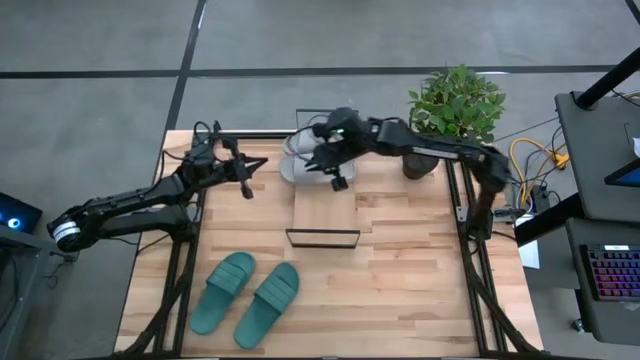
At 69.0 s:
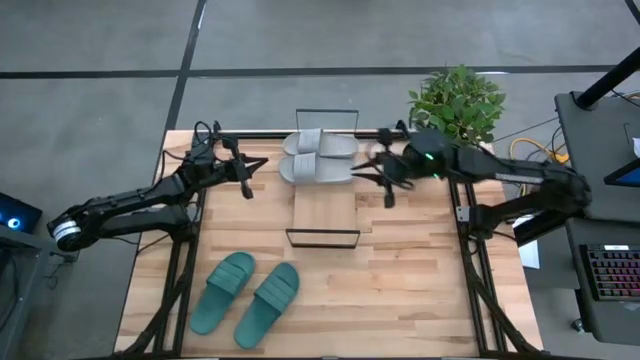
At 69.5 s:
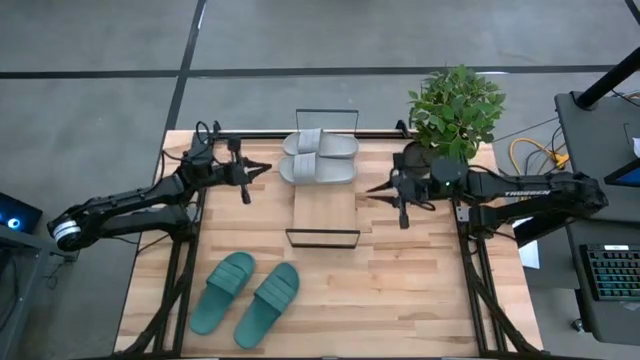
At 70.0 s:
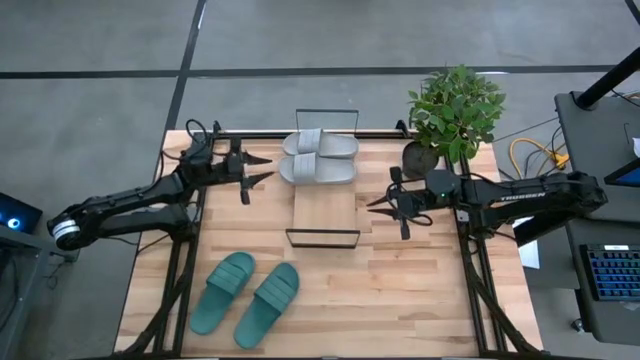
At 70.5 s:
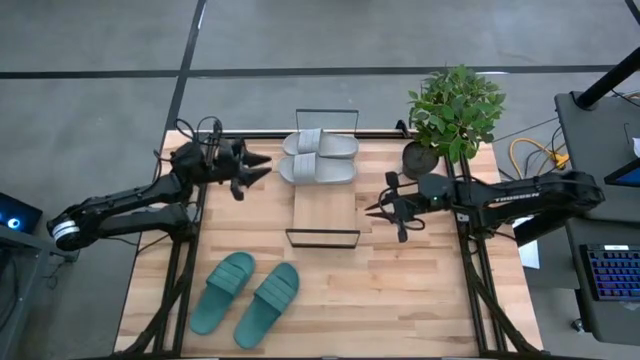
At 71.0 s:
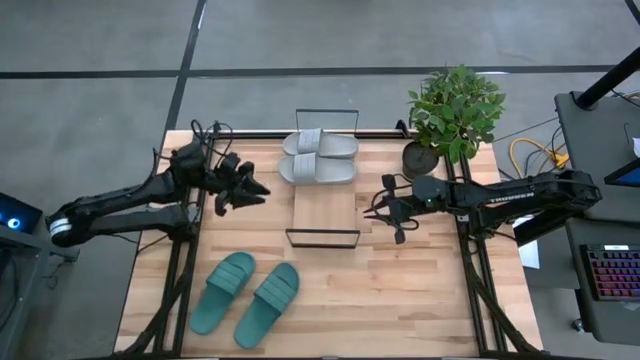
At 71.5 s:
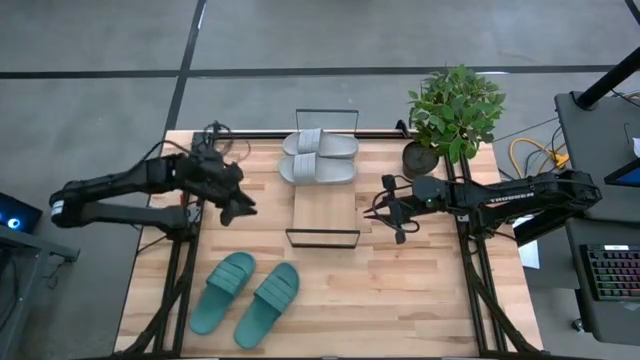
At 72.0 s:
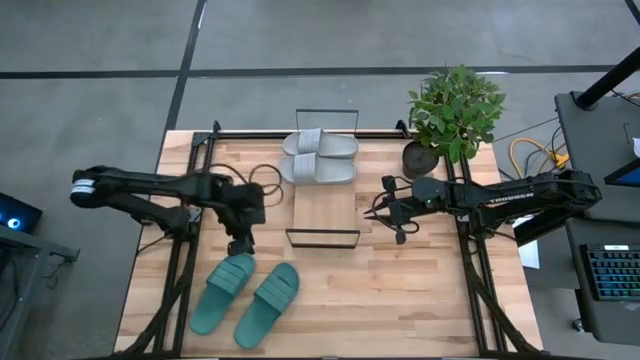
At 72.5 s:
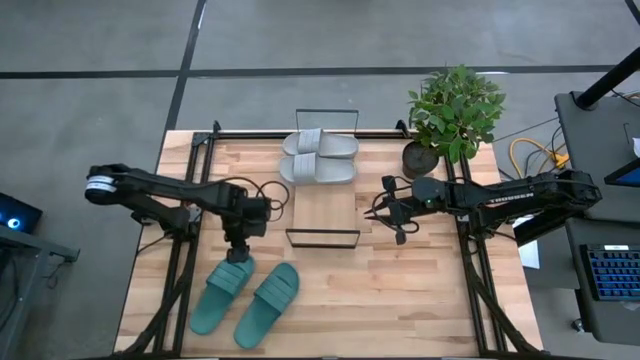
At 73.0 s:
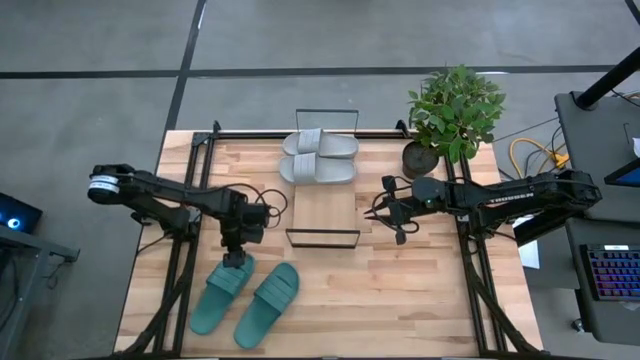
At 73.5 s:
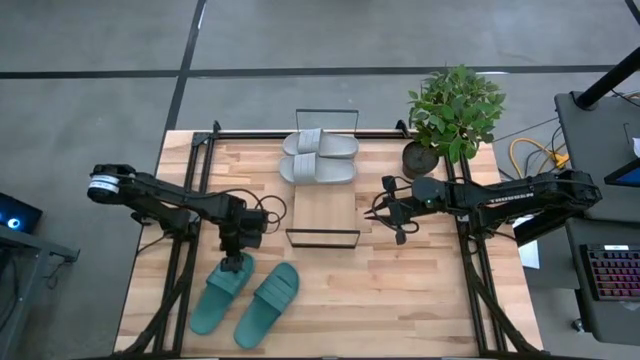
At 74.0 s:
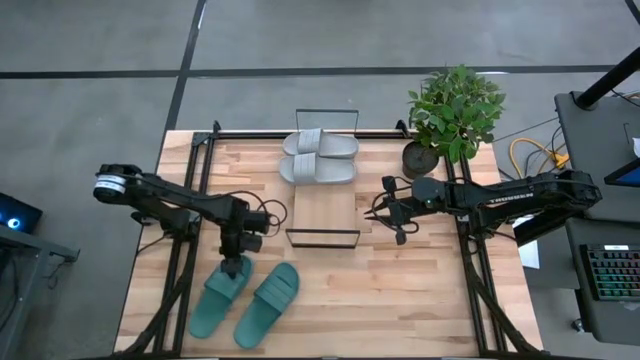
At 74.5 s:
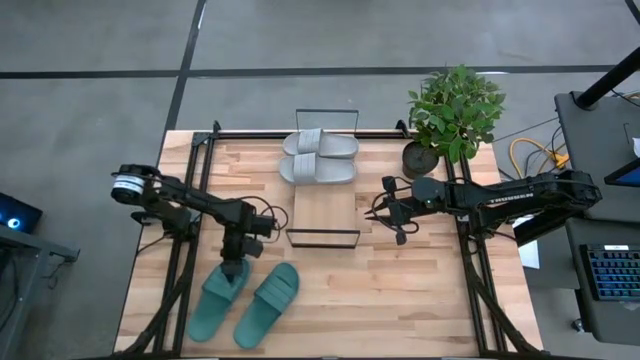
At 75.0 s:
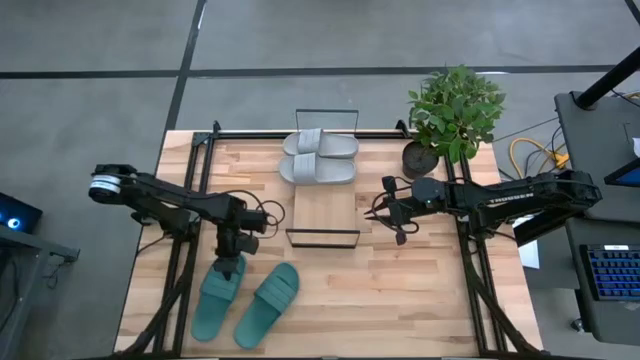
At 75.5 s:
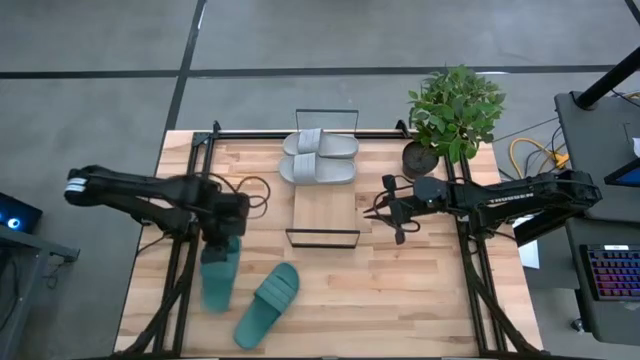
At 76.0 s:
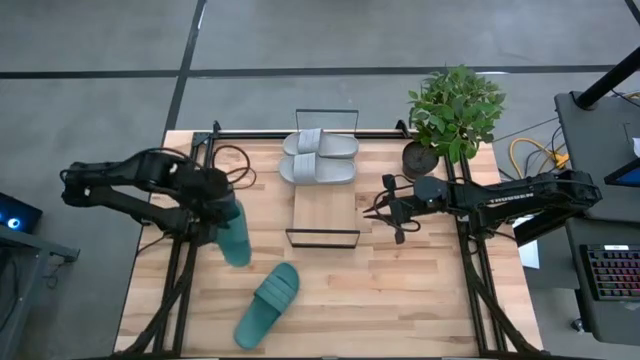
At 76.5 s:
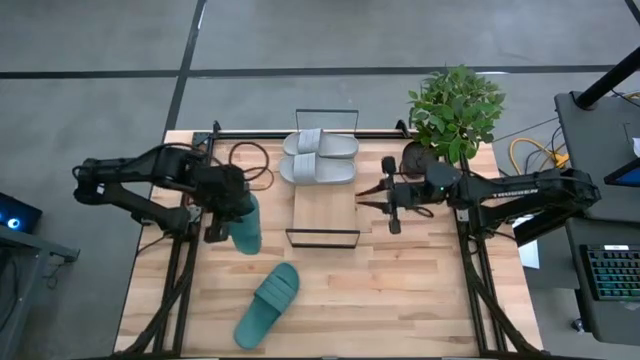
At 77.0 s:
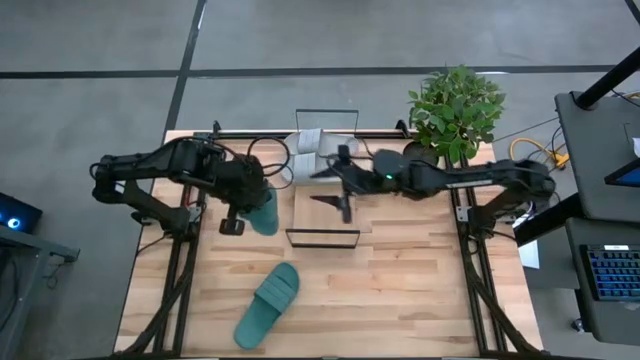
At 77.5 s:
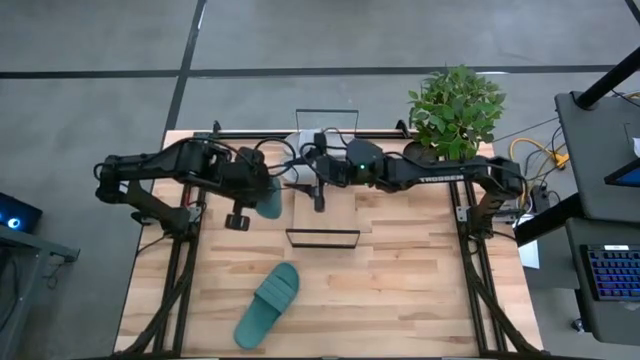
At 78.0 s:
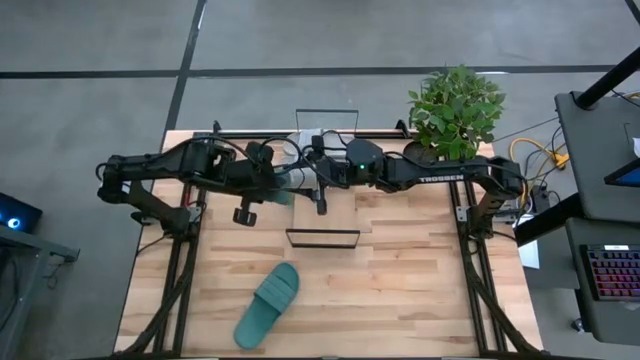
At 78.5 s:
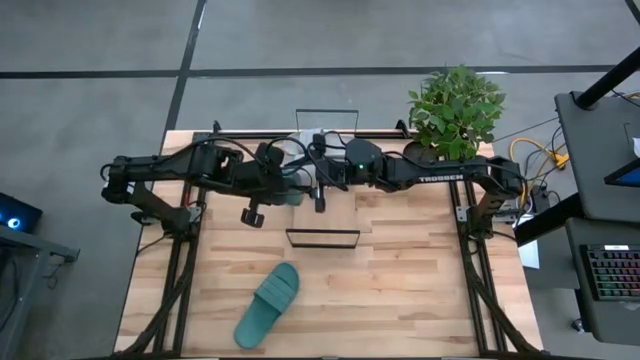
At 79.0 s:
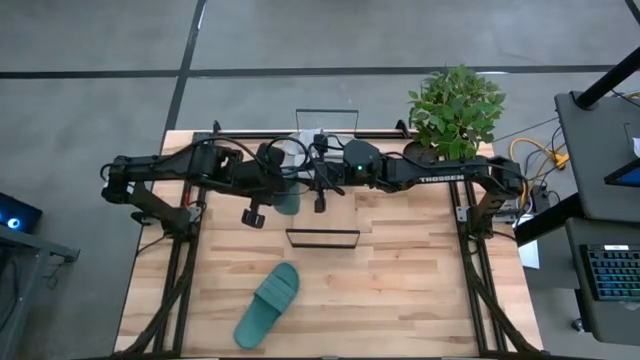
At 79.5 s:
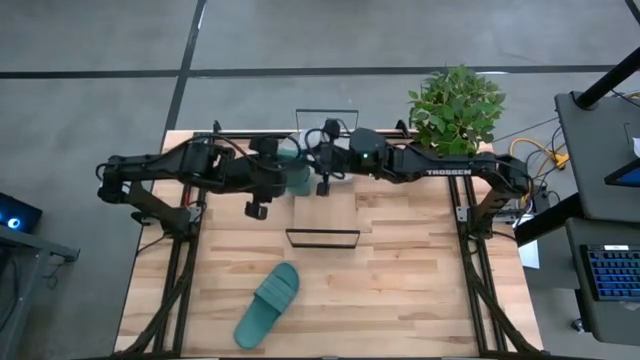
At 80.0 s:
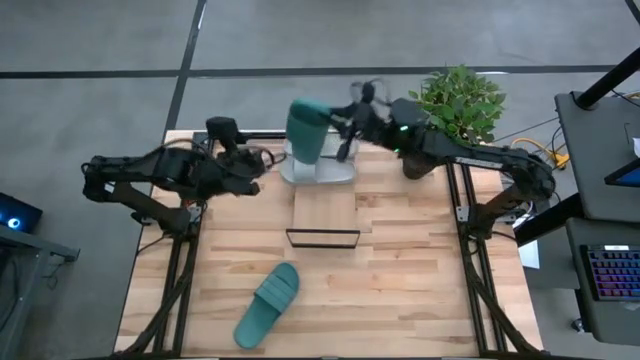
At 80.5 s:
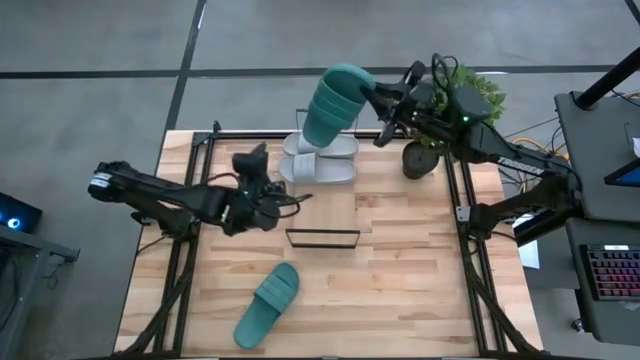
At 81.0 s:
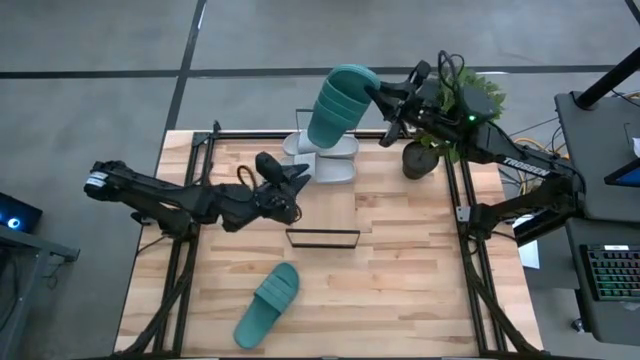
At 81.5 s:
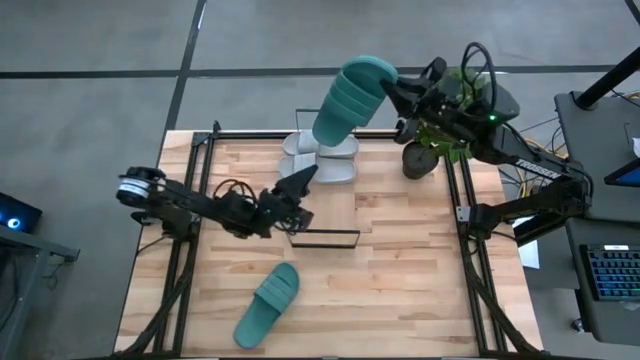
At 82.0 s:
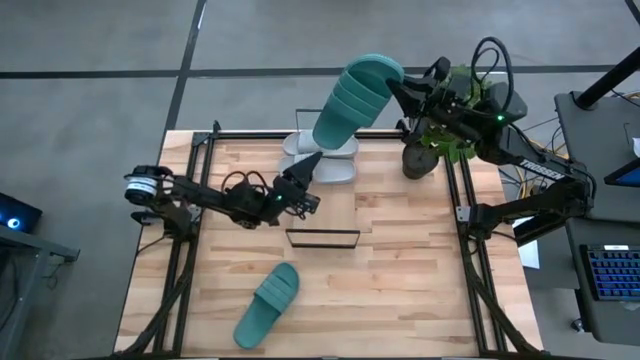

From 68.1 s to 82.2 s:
Task: Pick and place slides into the shelf
Put the left green slipper on the shelf

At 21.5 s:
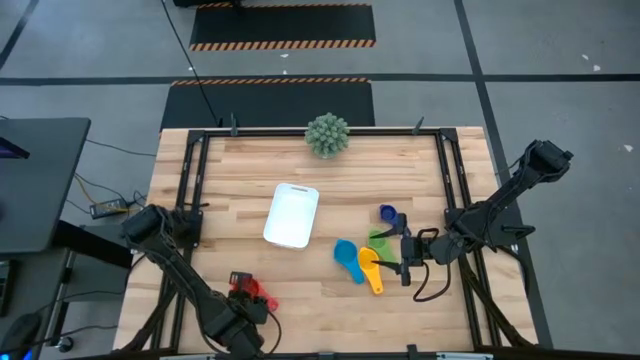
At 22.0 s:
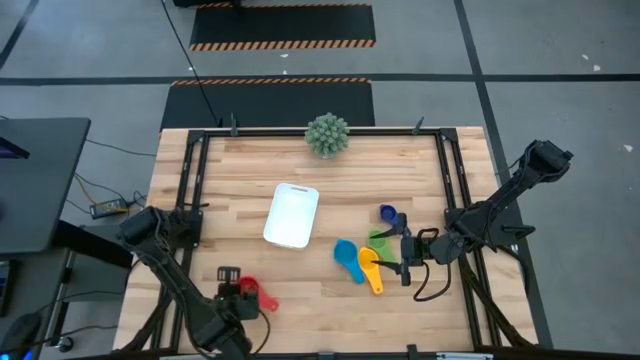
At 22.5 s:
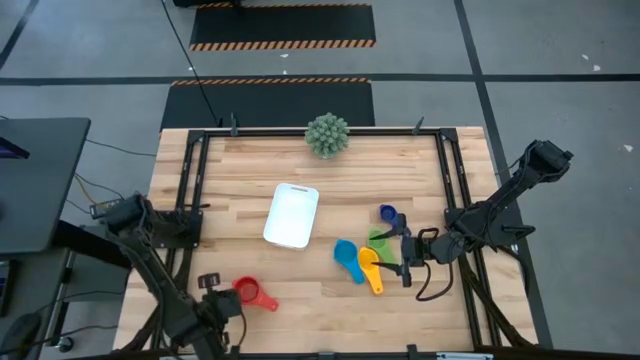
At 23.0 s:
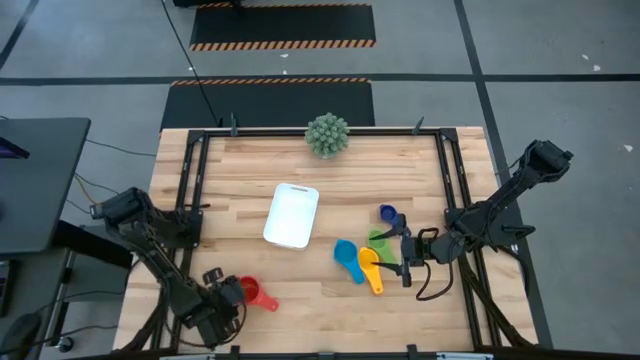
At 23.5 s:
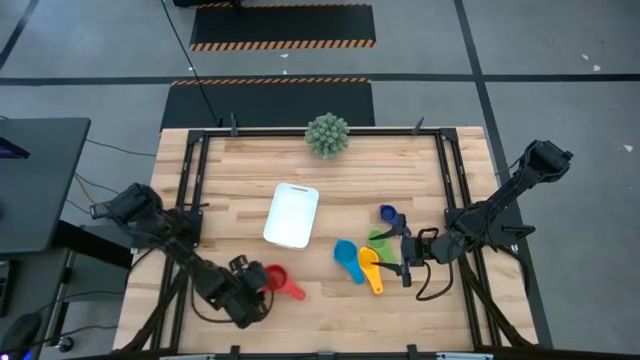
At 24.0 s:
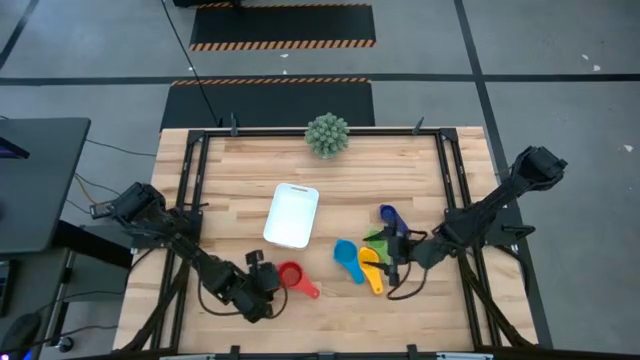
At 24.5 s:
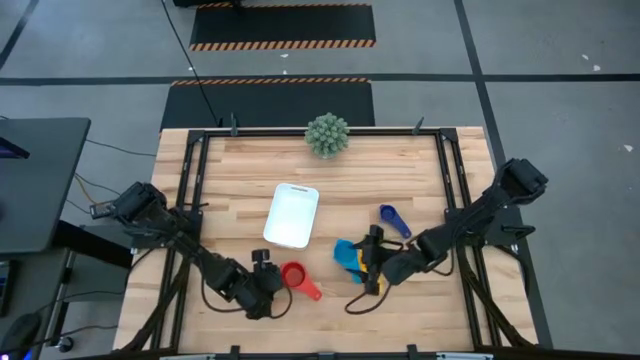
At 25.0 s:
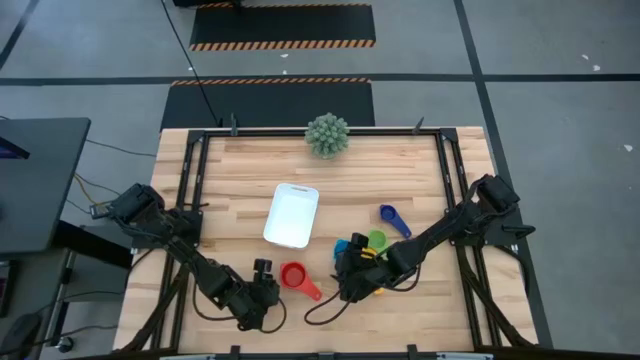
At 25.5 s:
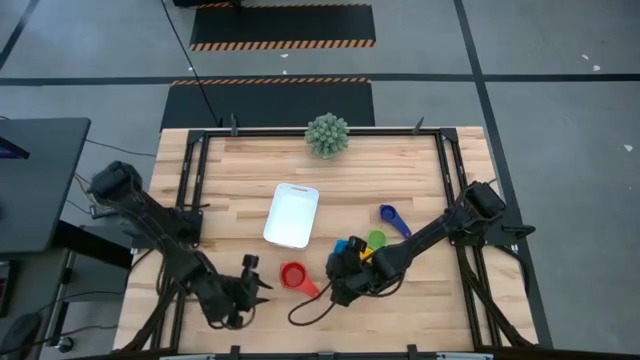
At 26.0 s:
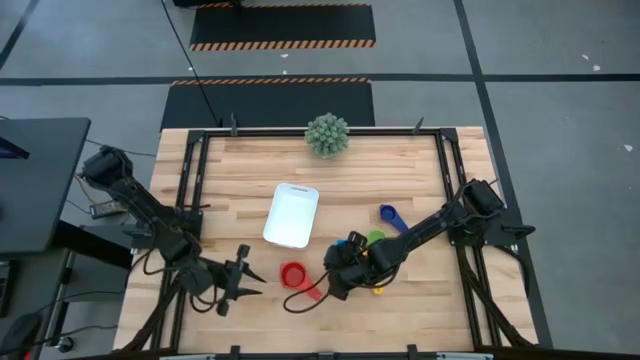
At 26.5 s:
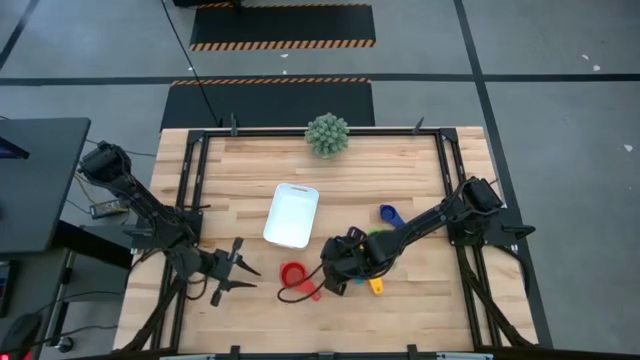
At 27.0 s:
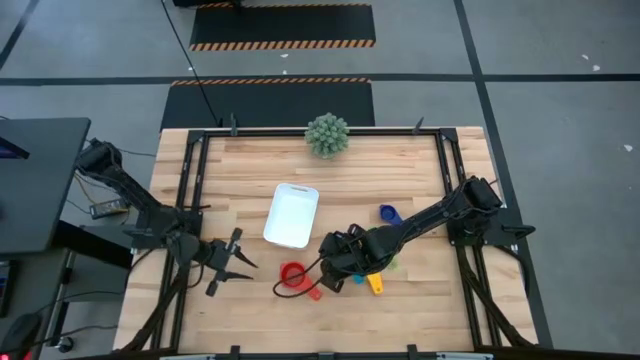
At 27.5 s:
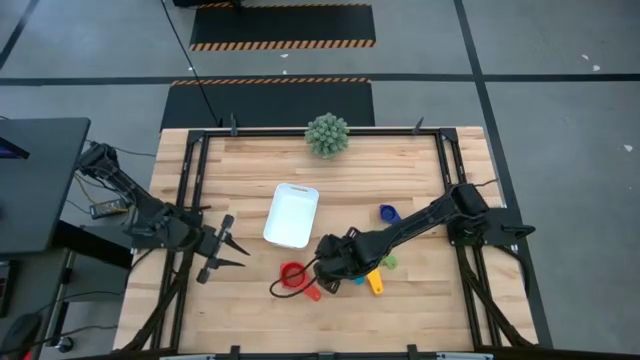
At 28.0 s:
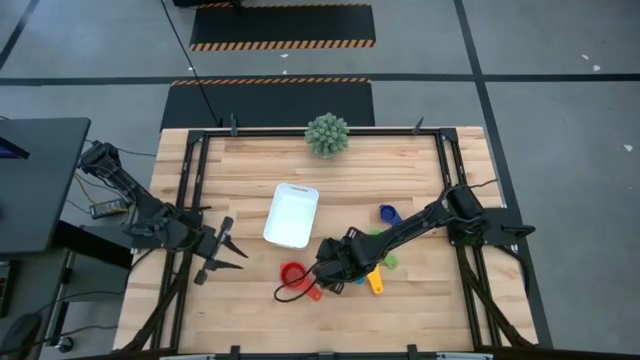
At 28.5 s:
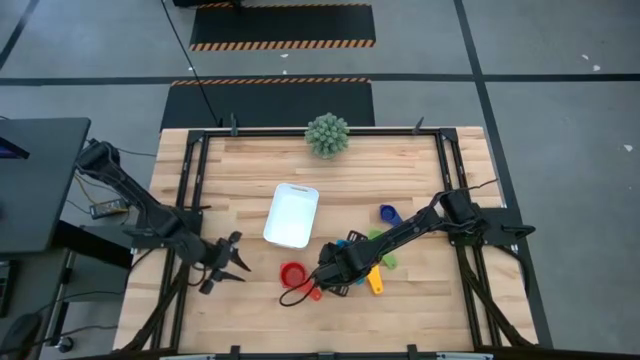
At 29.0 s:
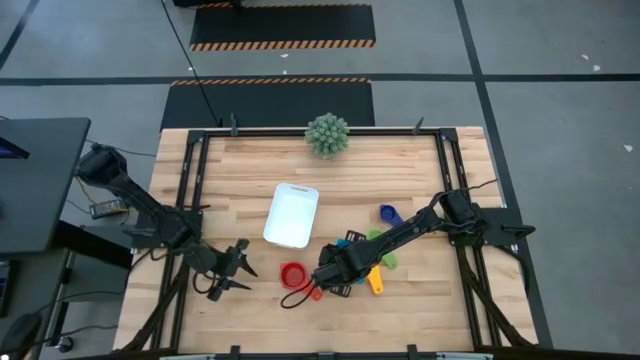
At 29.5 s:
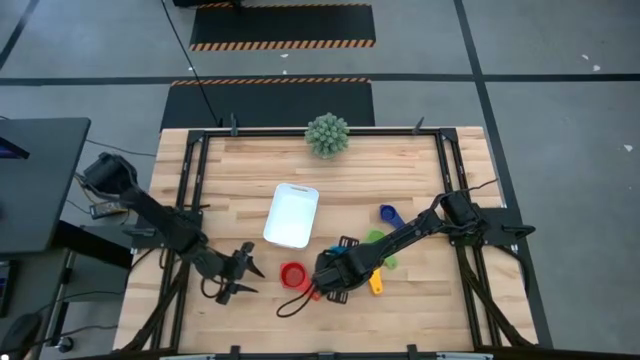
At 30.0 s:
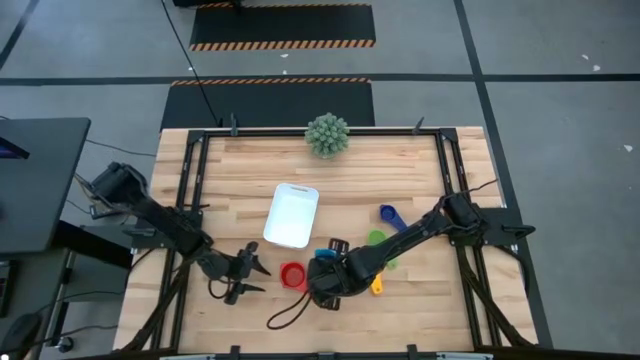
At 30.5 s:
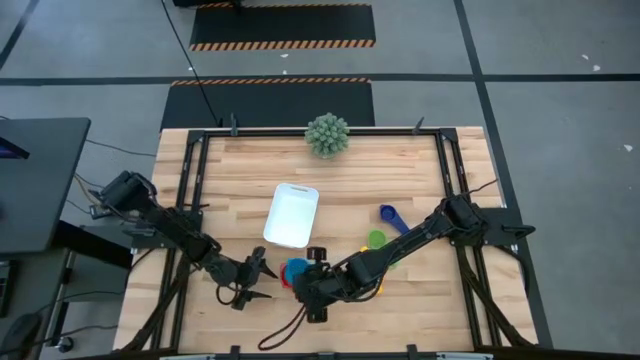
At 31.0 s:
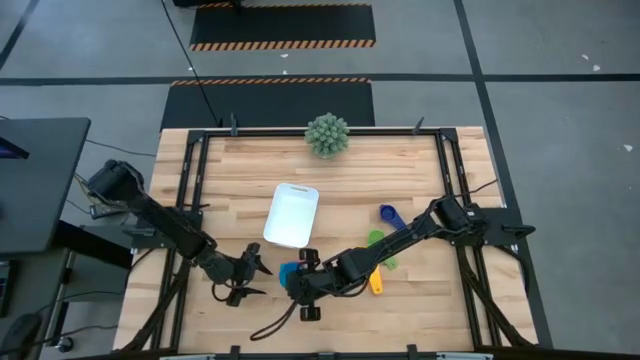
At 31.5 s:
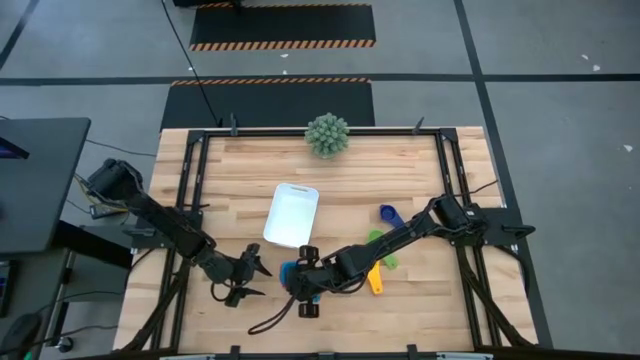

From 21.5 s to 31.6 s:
Task: Nest measuring cups in basket
Stack the light blue measuring cup on the top of the red measuring cup
